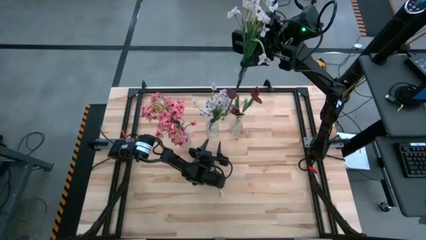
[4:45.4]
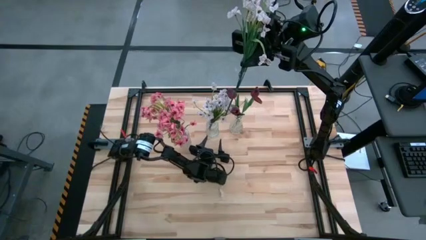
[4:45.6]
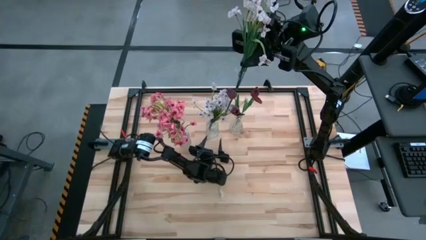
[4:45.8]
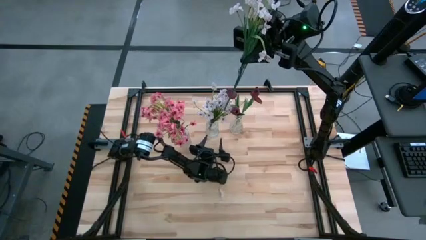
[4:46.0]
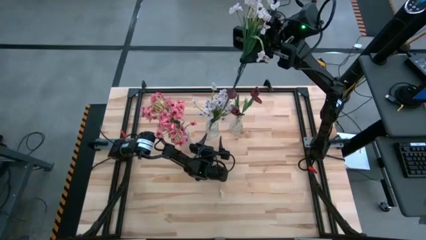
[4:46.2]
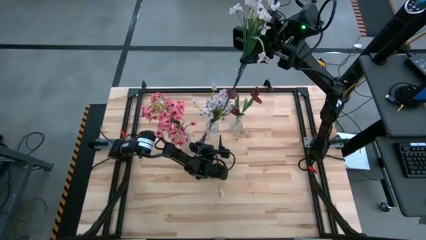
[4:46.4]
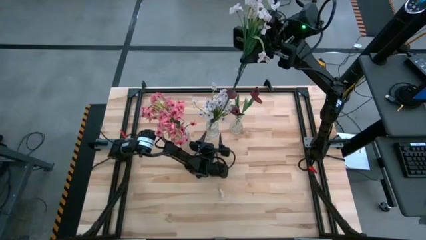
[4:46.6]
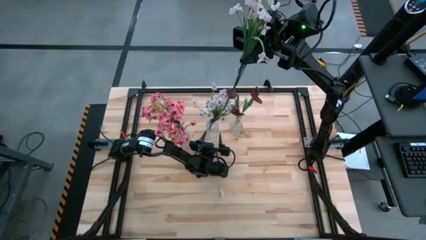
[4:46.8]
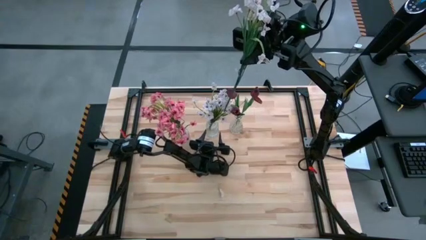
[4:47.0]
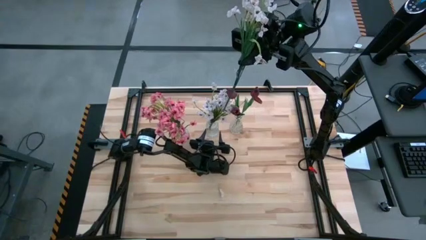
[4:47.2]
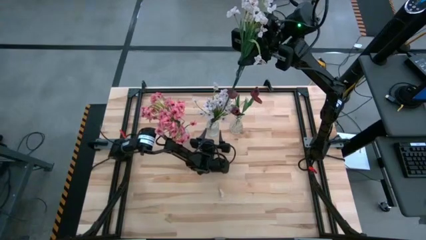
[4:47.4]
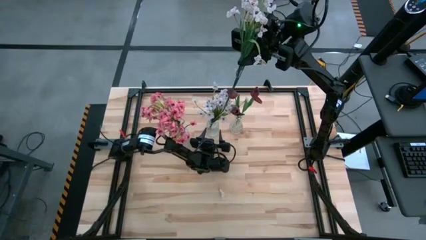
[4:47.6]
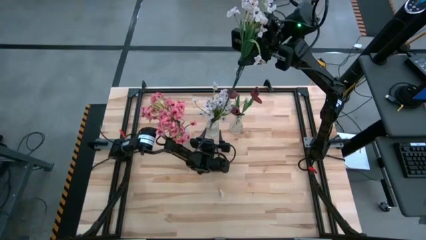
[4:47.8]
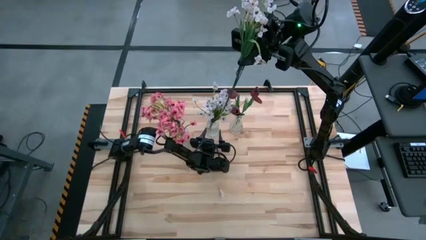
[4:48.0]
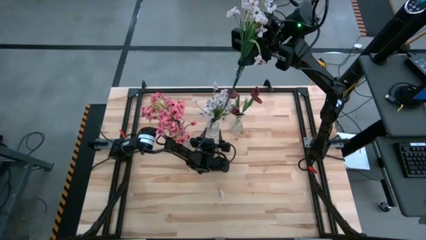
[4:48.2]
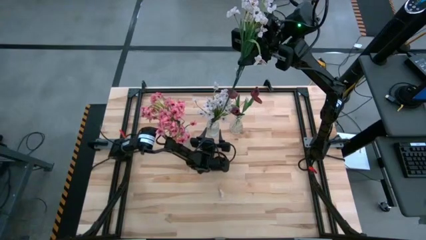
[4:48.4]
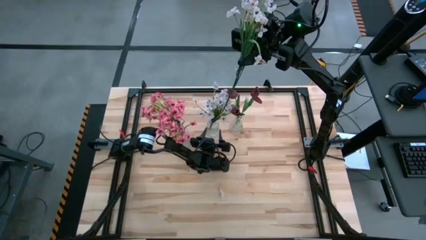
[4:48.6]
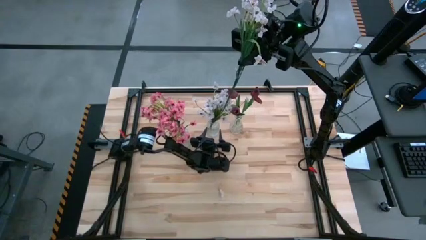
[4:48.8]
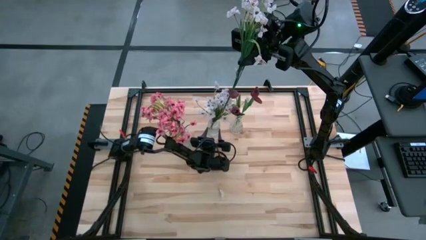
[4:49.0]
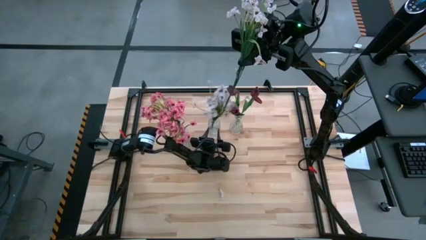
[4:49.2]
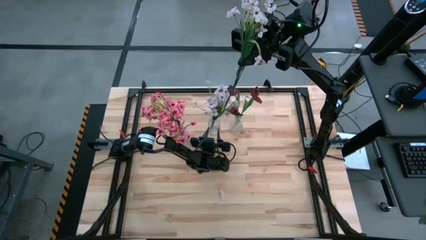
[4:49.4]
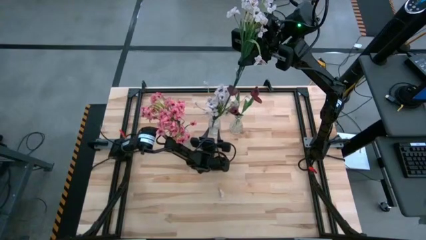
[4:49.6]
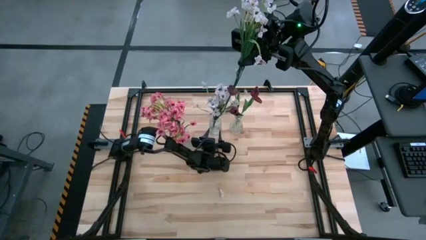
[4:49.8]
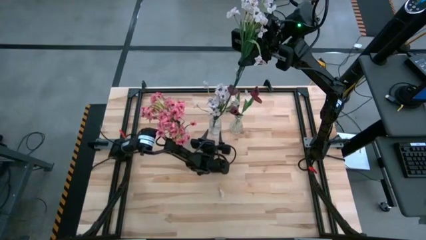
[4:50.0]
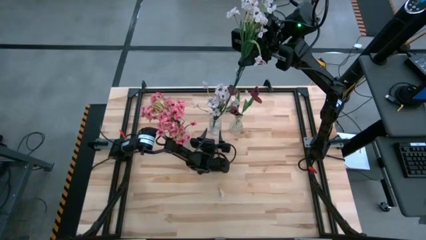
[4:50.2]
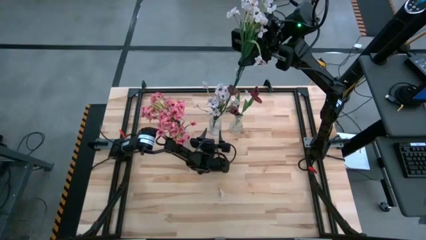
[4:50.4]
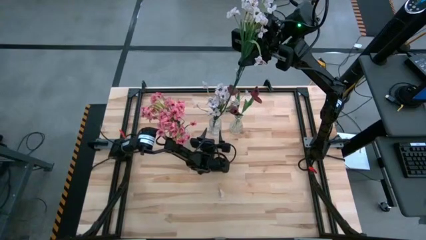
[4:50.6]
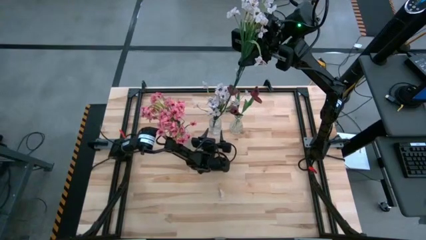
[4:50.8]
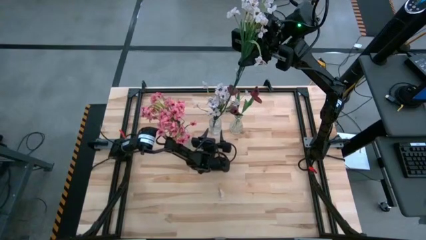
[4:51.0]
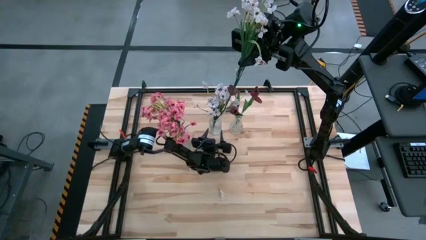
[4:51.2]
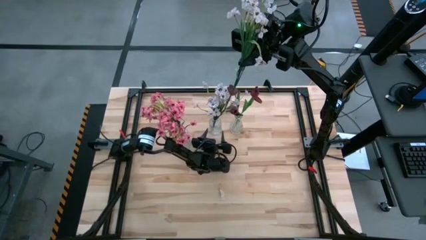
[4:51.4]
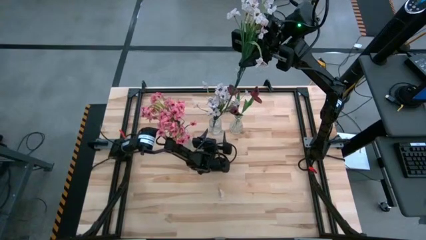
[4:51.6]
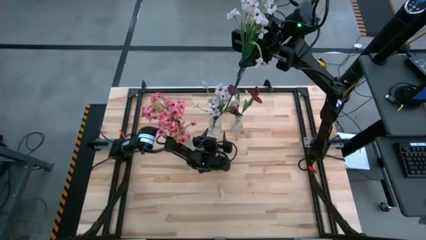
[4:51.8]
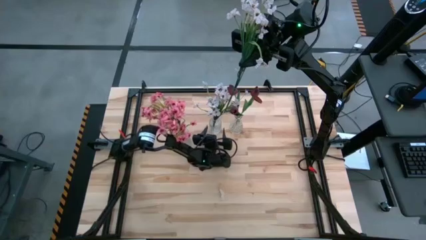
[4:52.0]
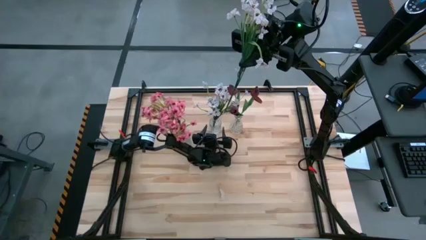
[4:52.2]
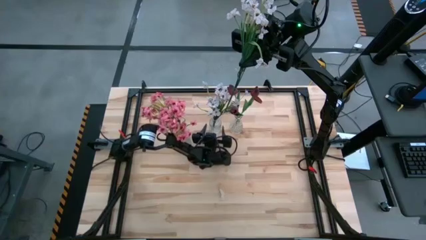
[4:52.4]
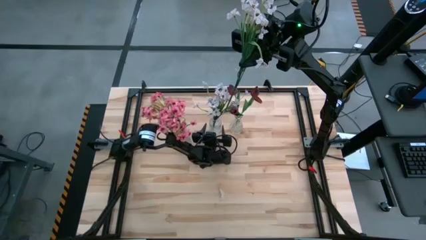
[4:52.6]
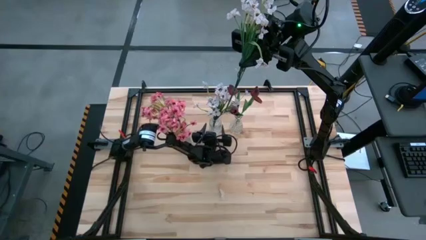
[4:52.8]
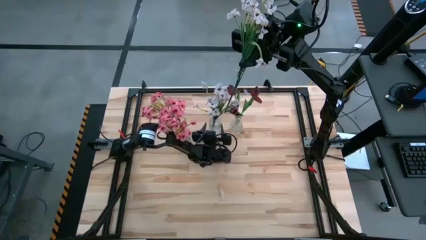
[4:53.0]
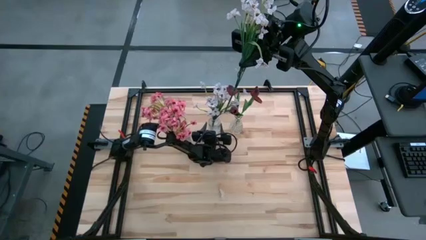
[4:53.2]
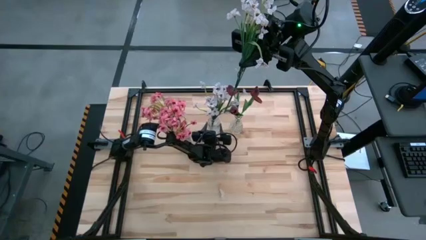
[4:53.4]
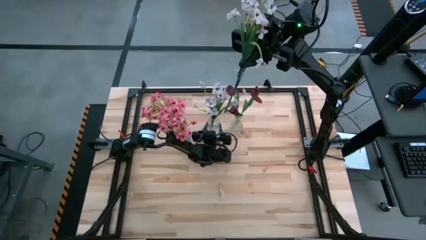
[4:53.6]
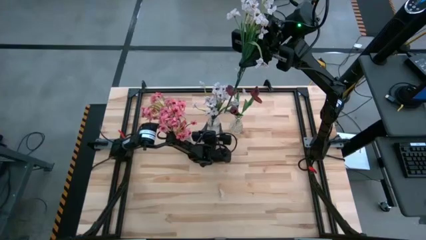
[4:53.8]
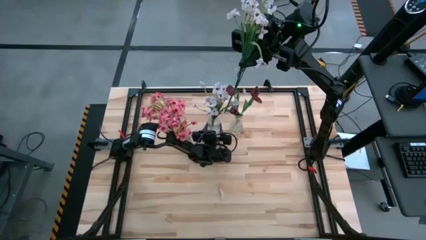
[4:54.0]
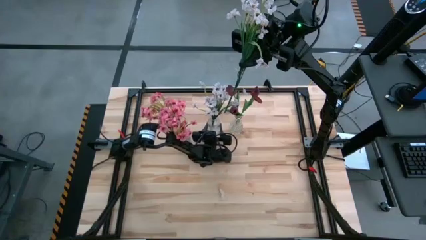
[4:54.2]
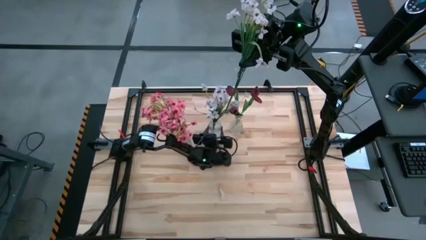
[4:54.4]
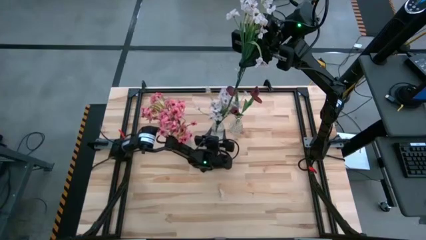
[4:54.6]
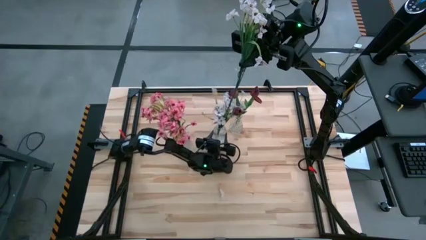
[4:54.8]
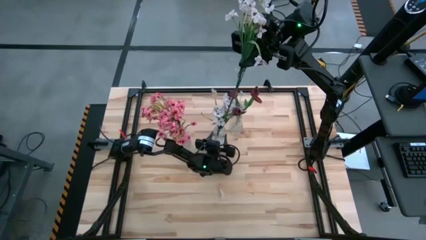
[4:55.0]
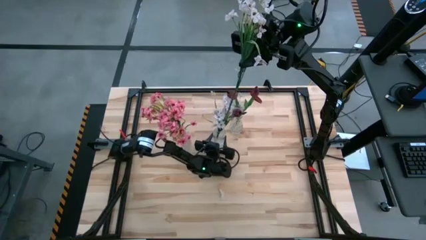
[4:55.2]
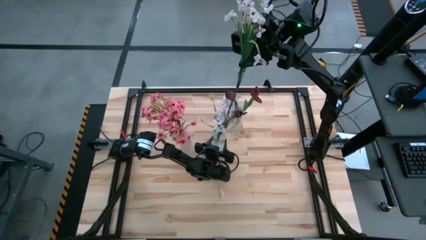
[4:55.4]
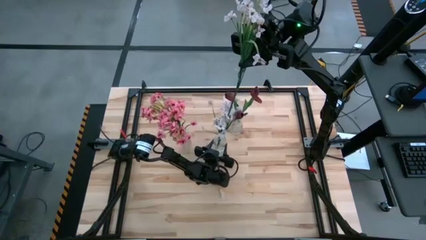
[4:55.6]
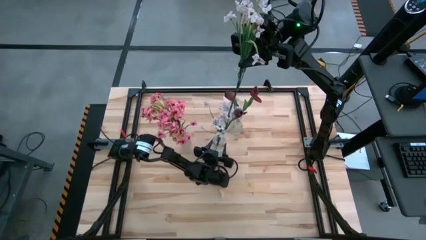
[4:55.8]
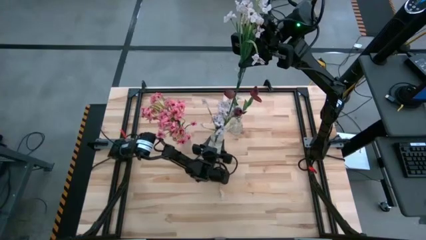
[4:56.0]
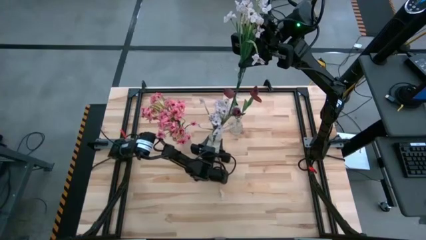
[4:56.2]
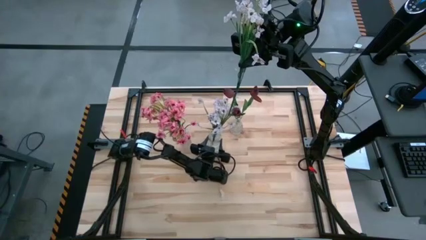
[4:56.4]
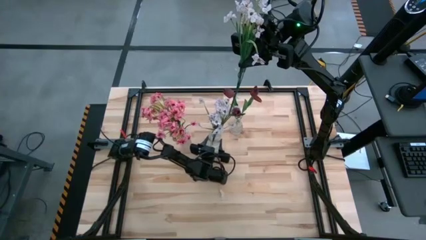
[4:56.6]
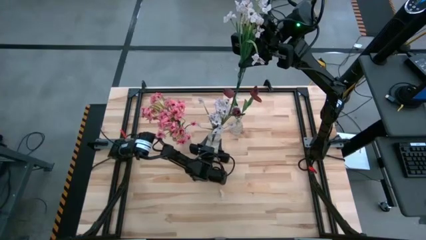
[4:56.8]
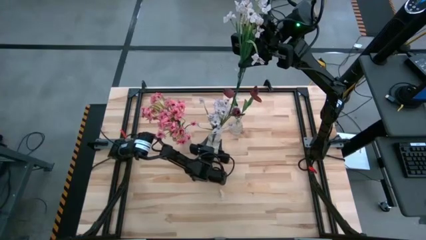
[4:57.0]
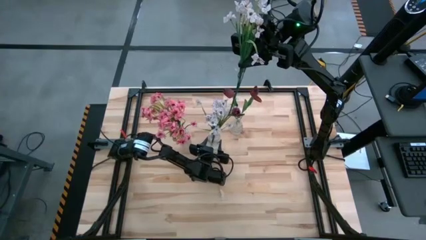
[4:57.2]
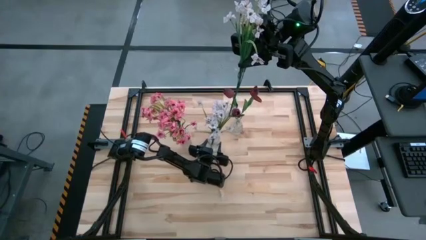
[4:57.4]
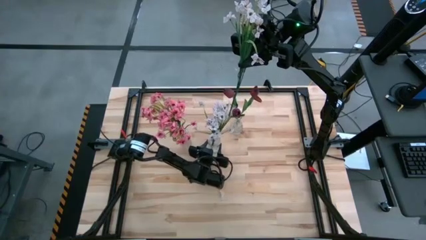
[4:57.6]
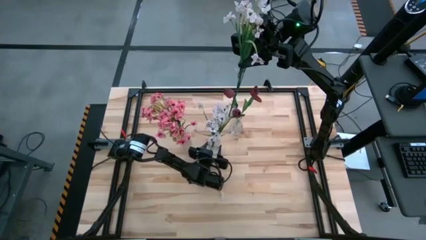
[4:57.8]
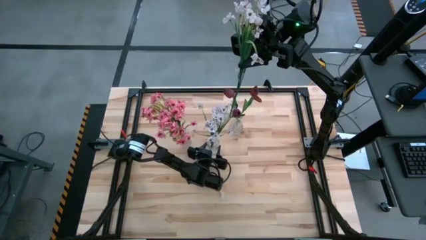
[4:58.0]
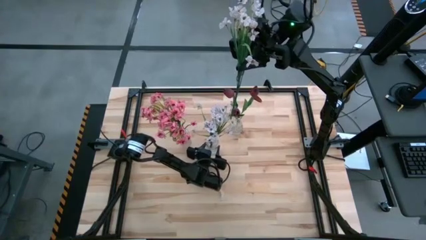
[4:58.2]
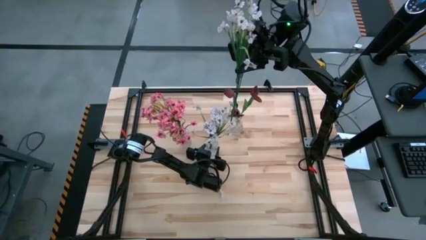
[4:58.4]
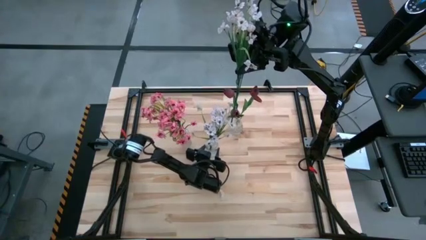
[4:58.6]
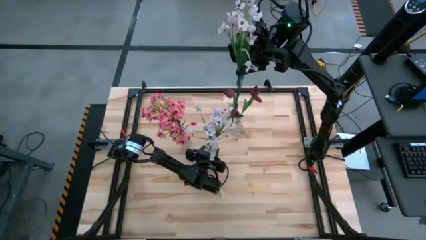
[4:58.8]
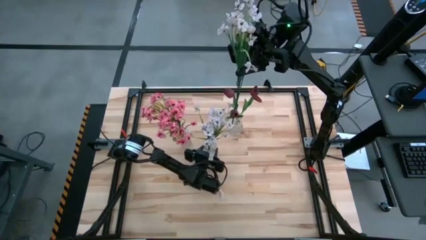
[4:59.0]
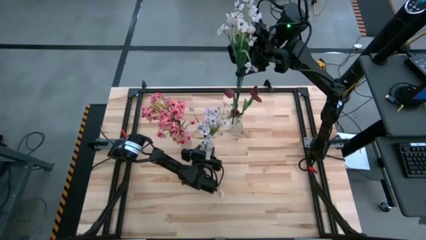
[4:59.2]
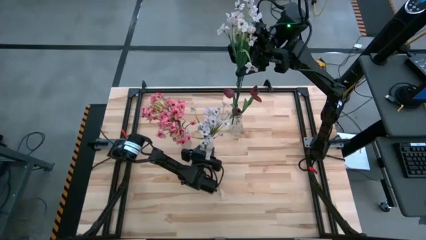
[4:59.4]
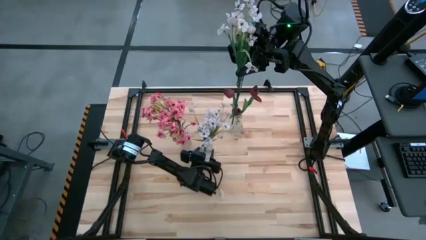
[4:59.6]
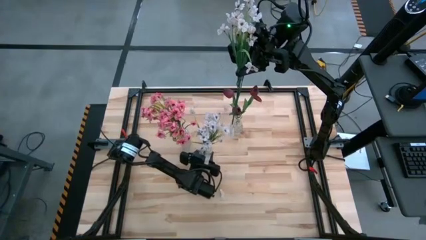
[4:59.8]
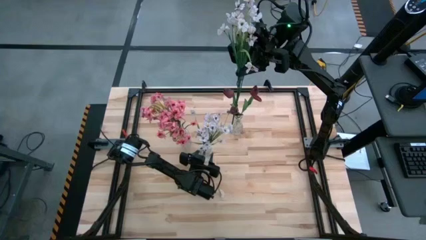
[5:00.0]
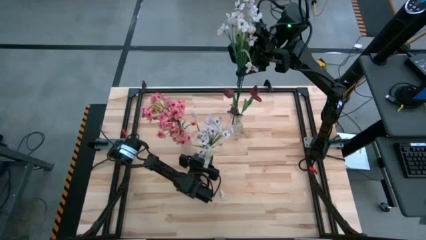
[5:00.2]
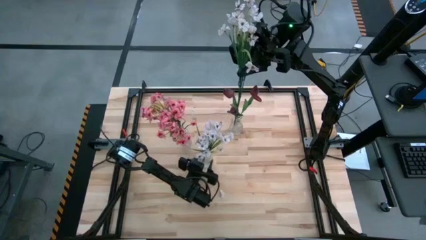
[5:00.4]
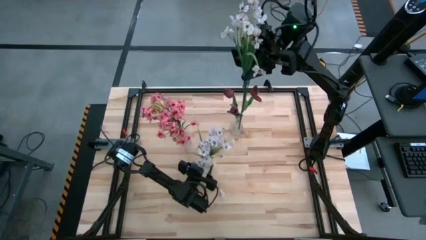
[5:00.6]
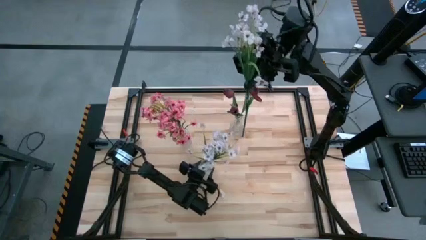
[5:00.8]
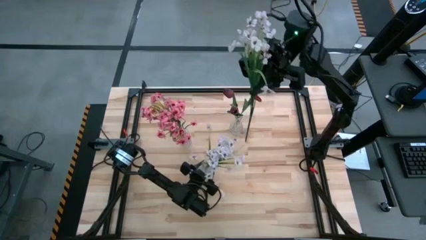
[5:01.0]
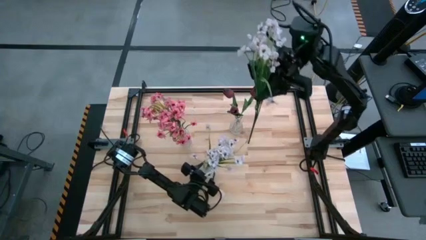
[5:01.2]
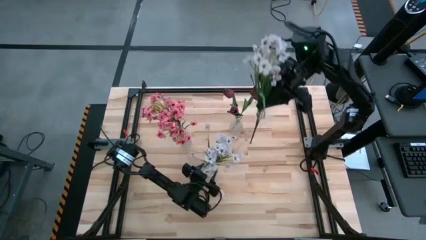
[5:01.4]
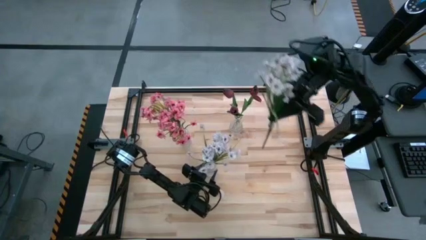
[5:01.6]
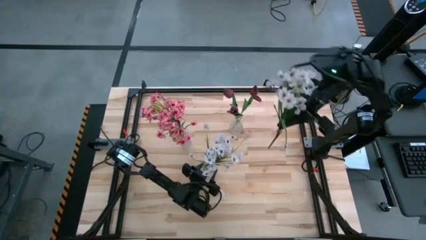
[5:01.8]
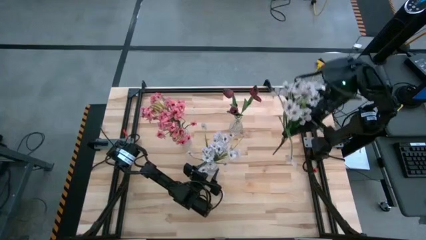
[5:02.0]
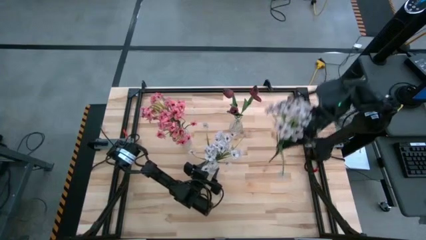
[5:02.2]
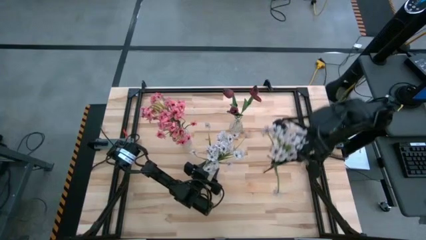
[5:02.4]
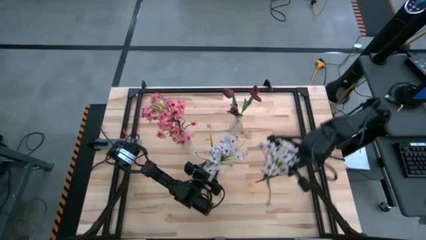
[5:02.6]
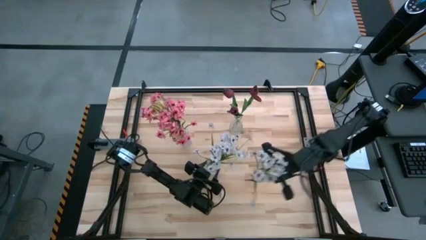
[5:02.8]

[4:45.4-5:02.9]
Task: Sort flowers into vase by color
Put the white flower into the top transparent vase
